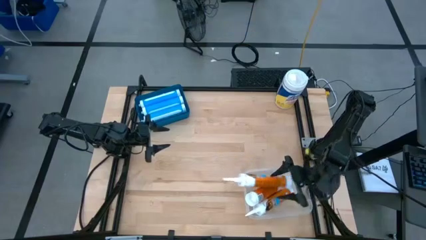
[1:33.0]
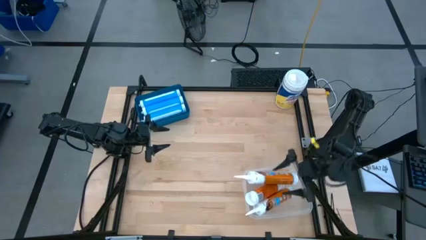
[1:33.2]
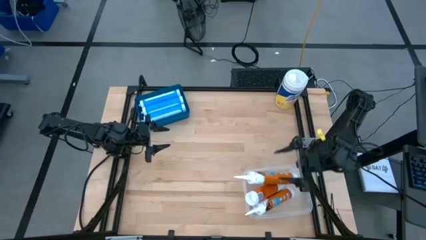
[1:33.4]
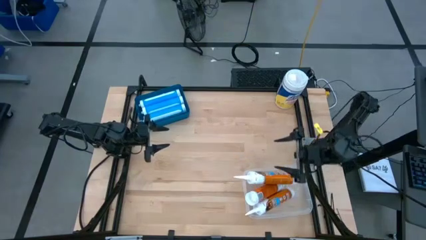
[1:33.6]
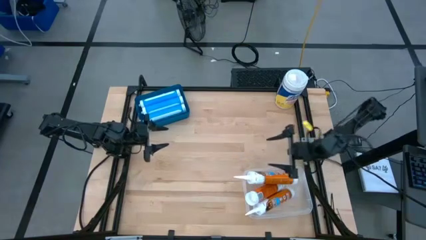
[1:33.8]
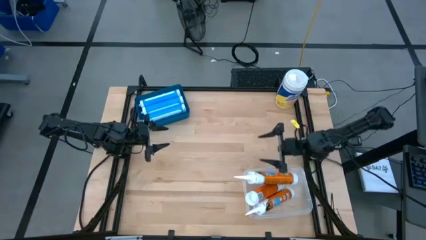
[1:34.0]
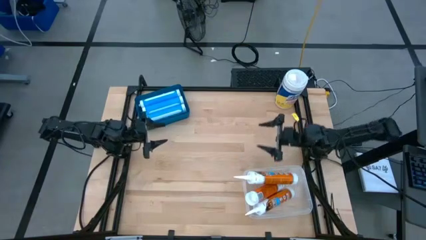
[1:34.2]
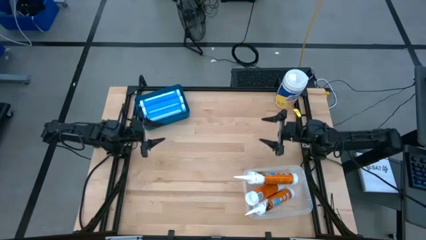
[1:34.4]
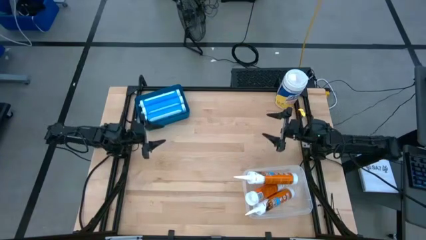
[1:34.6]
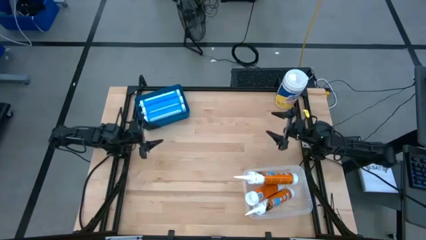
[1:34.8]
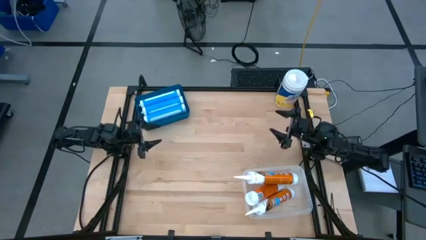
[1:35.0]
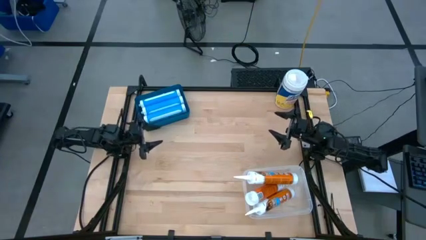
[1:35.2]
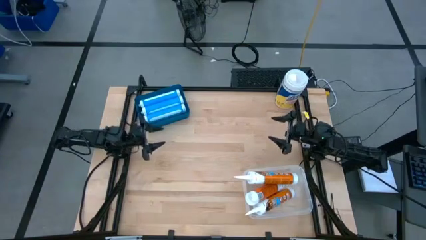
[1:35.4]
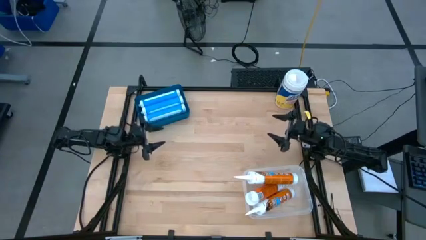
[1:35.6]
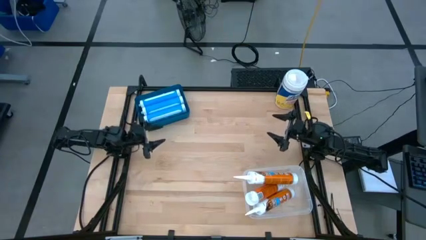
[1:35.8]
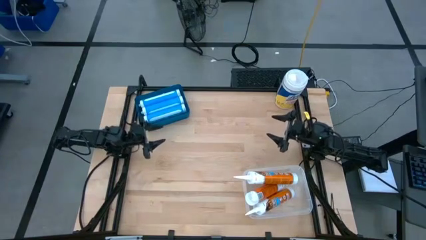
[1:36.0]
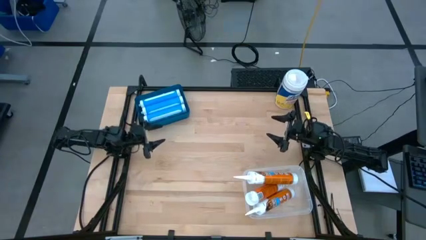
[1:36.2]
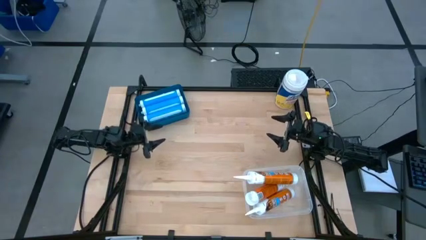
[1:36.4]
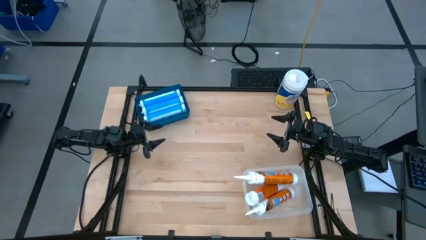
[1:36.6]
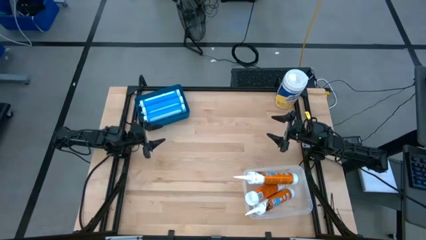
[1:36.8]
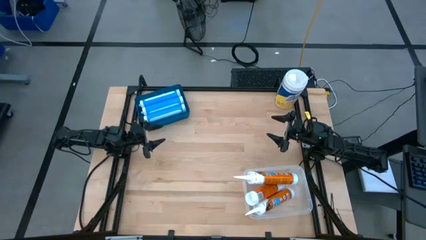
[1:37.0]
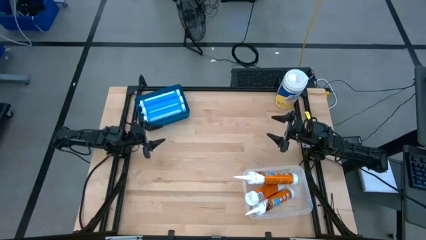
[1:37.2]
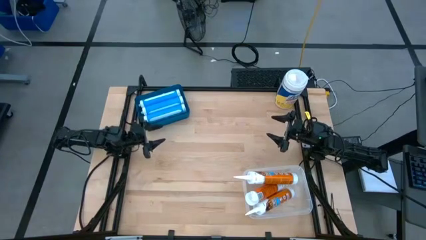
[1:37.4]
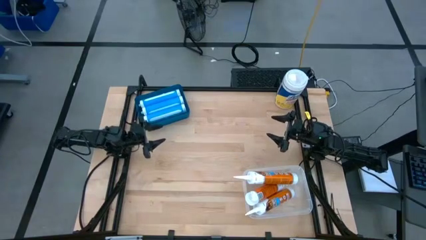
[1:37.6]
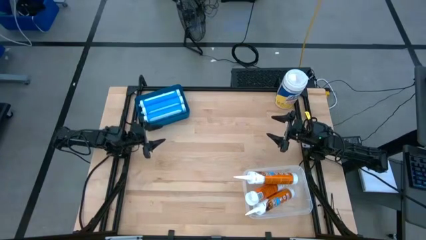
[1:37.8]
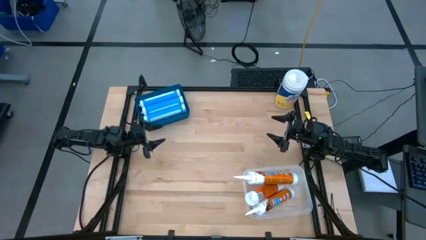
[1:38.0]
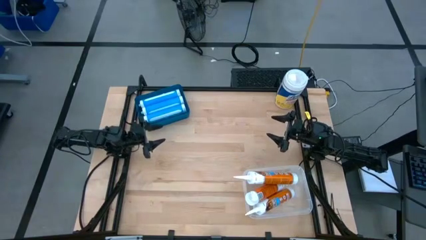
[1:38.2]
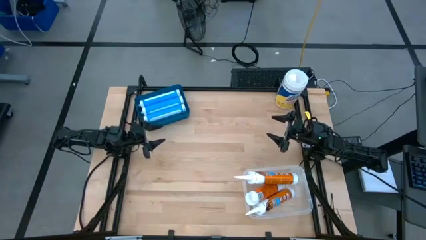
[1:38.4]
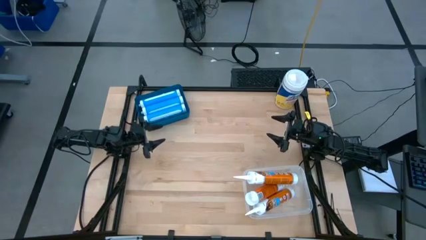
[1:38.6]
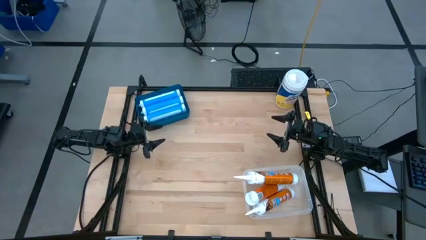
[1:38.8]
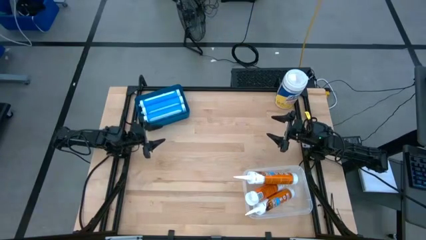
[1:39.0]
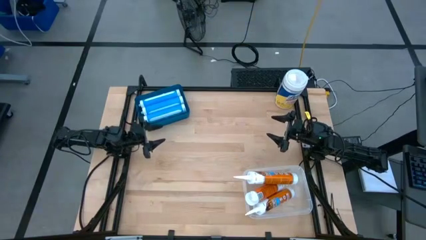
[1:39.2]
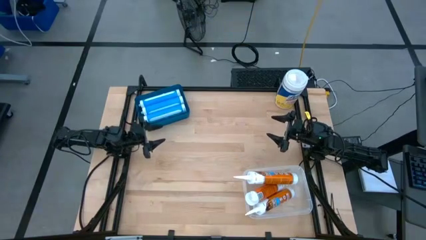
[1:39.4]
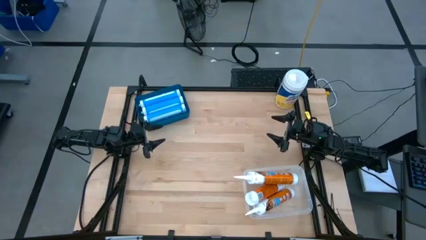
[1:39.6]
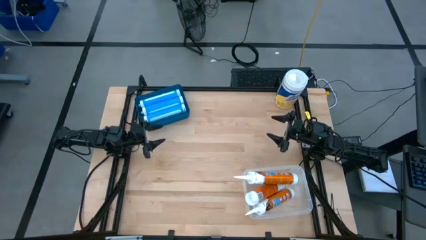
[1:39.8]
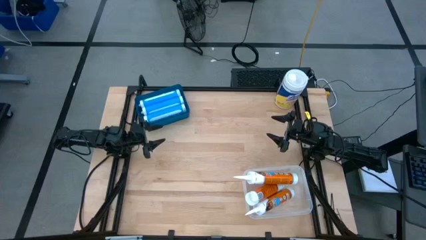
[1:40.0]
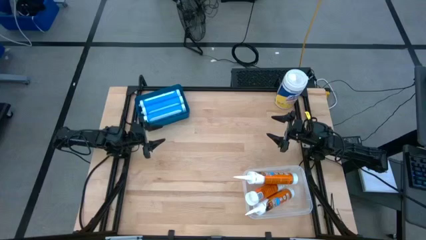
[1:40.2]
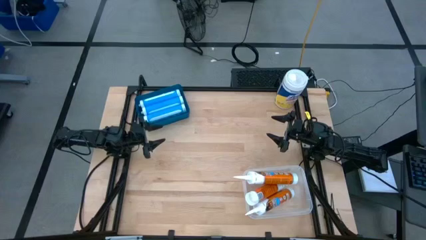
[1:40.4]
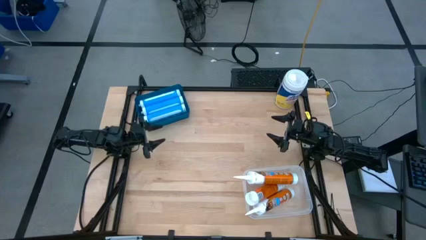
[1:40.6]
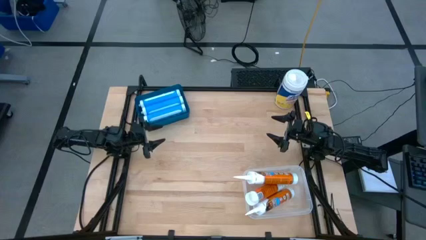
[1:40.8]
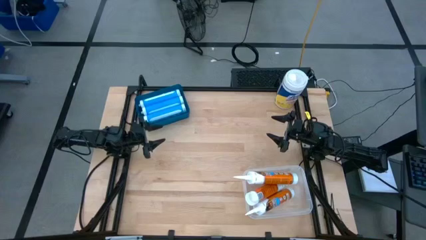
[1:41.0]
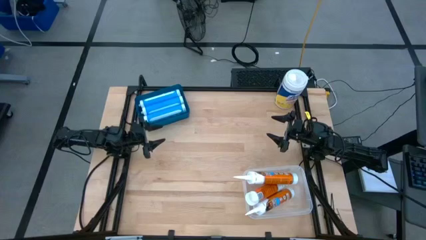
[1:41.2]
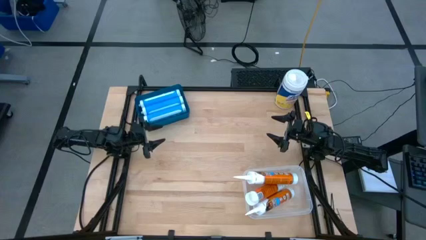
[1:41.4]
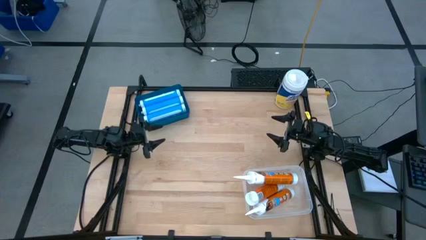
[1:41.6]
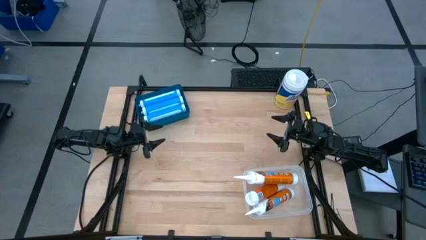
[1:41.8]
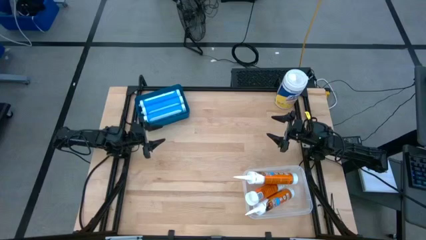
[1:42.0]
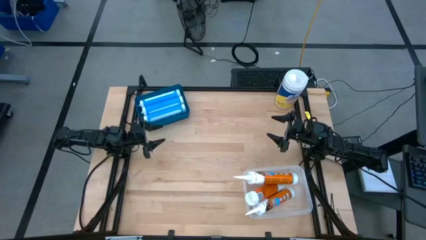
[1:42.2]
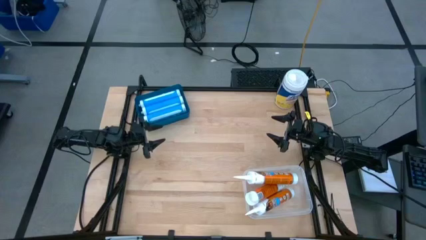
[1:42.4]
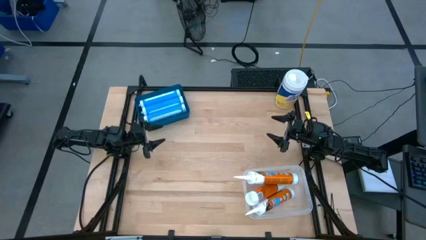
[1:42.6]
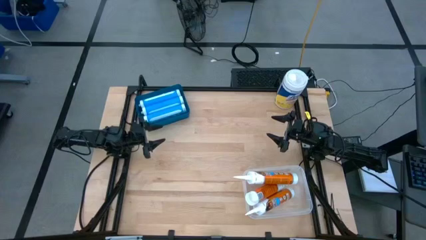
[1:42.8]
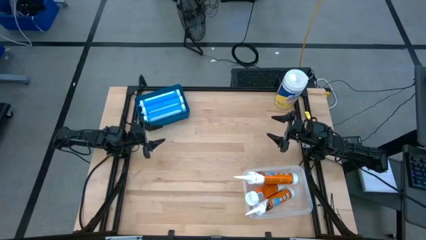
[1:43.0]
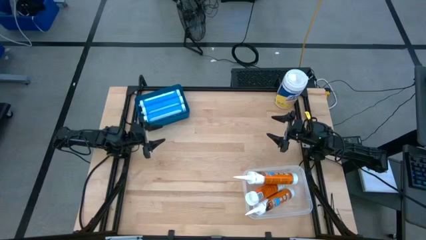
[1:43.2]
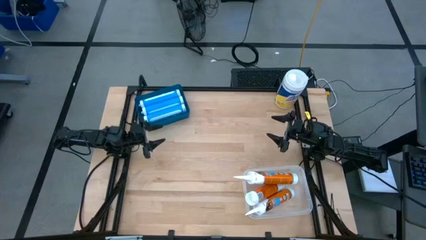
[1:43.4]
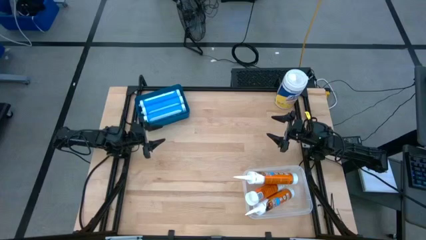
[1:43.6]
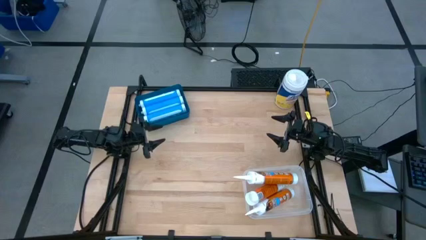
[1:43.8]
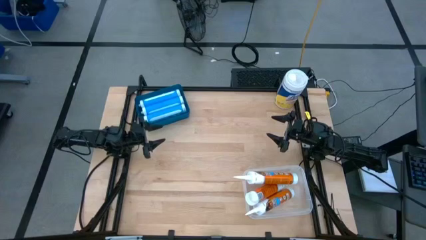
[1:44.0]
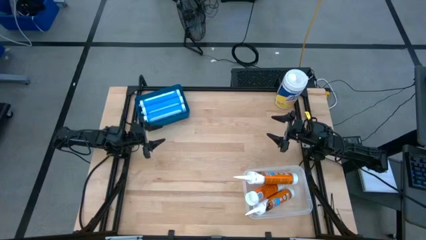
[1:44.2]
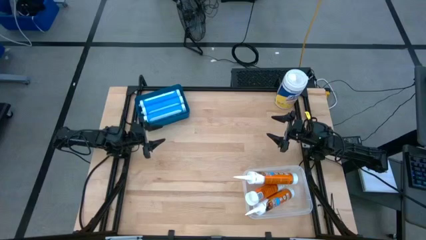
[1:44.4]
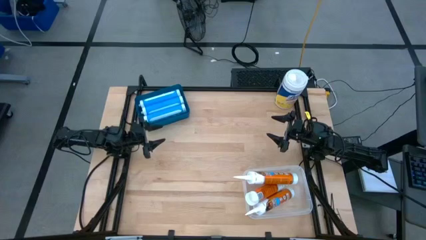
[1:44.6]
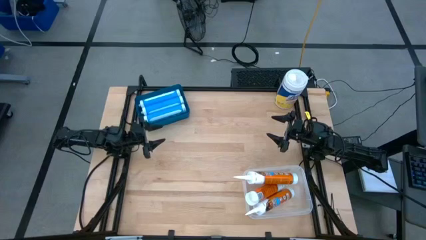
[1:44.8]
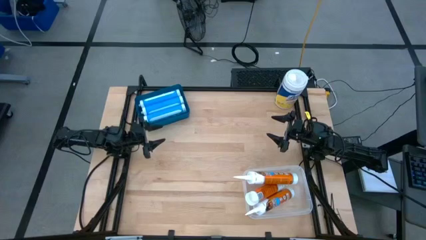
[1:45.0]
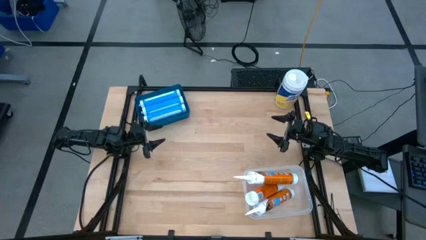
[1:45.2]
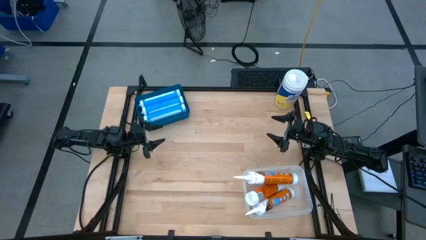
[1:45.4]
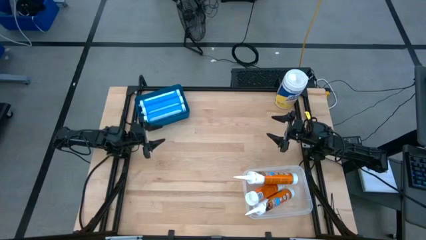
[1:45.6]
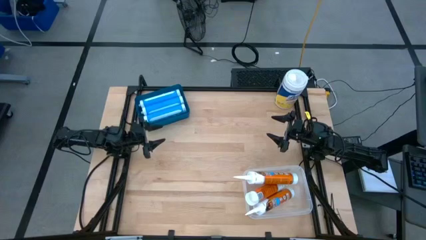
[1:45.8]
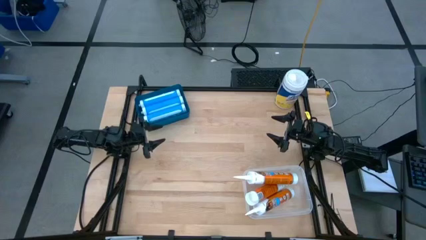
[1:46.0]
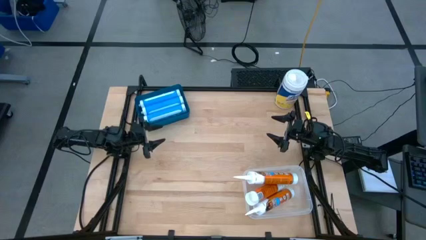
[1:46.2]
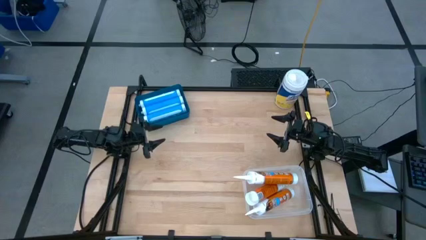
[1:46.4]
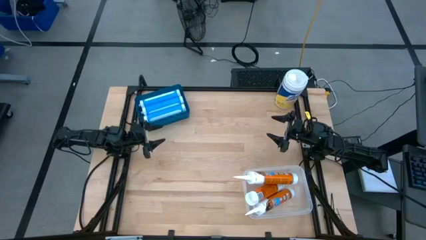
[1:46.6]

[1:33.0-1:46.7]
Task: Pick & place silicon tubes, Sealant and Lysol wipes
Return to Home Position
